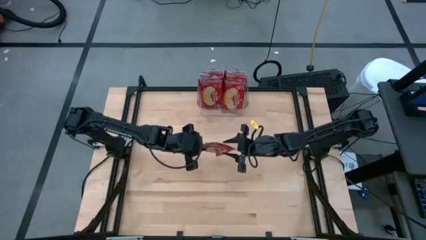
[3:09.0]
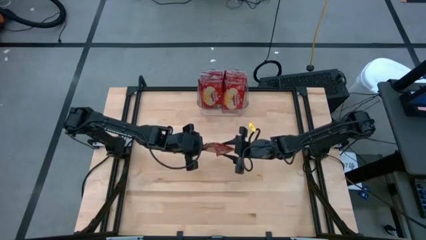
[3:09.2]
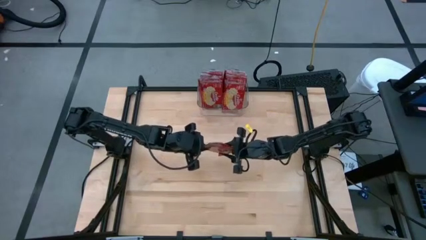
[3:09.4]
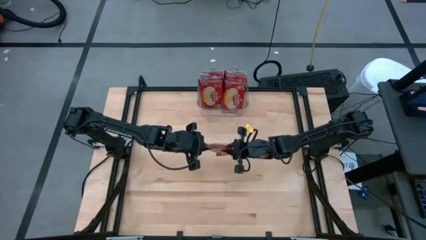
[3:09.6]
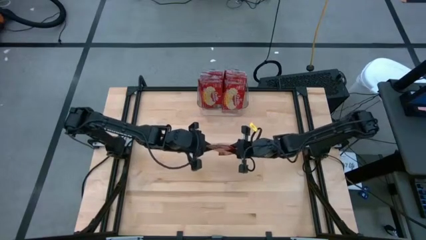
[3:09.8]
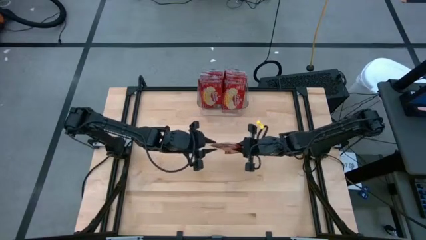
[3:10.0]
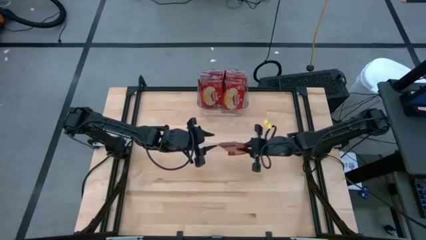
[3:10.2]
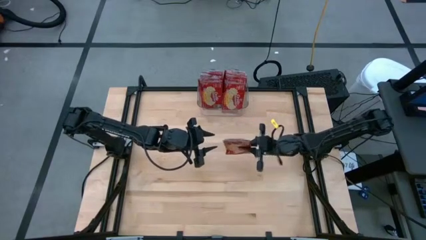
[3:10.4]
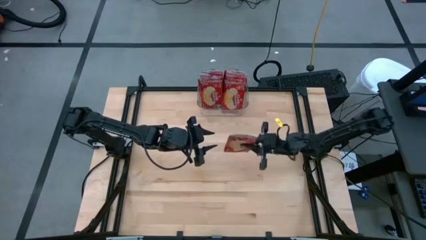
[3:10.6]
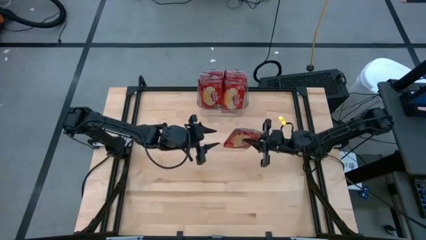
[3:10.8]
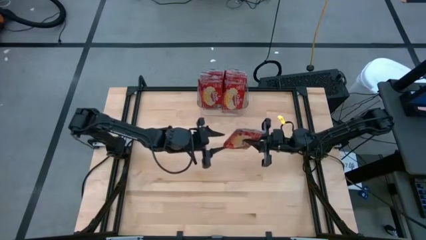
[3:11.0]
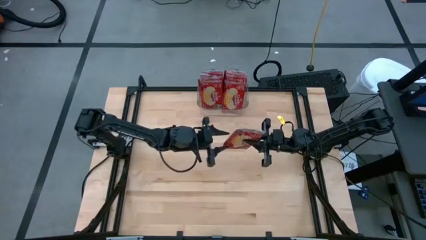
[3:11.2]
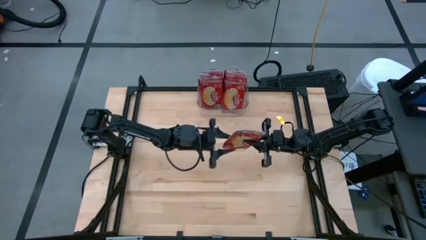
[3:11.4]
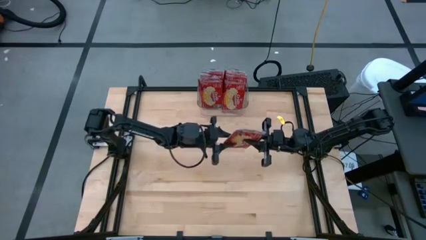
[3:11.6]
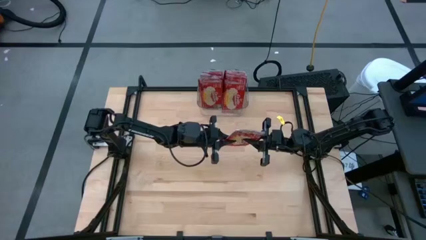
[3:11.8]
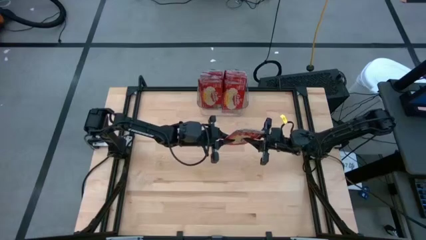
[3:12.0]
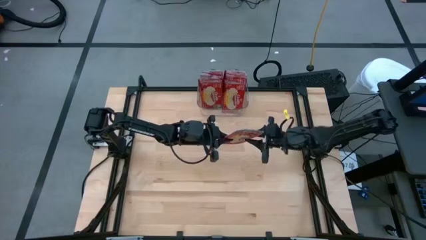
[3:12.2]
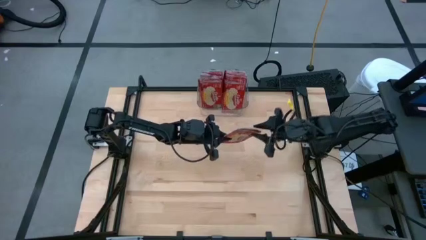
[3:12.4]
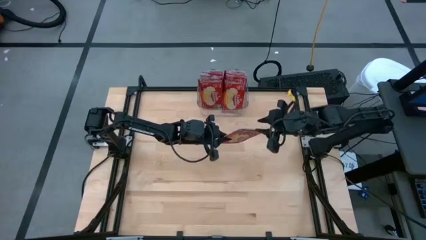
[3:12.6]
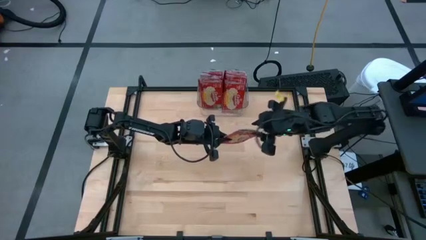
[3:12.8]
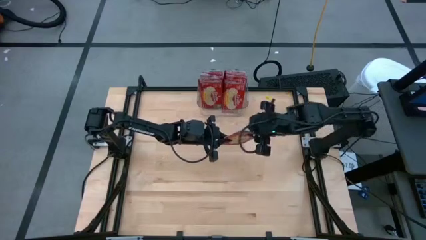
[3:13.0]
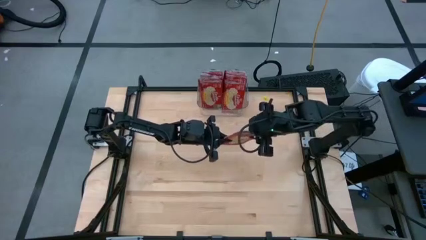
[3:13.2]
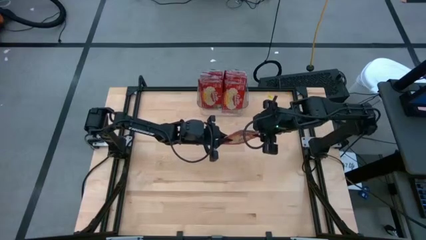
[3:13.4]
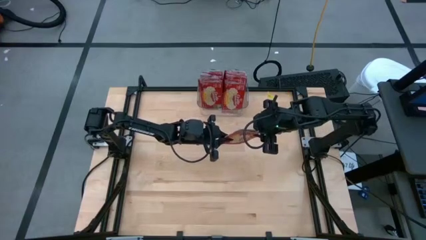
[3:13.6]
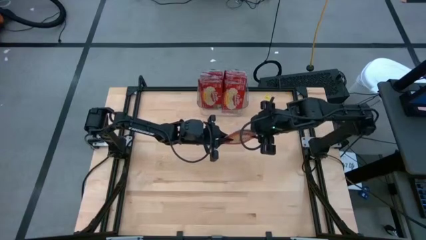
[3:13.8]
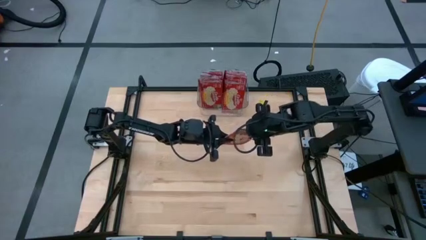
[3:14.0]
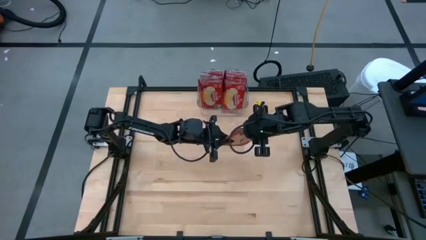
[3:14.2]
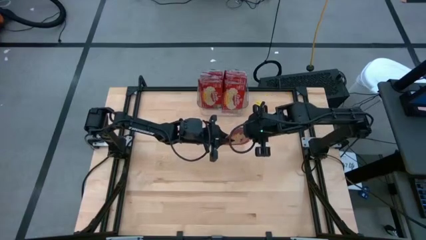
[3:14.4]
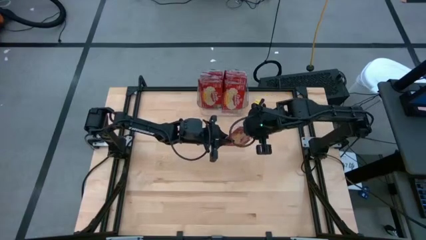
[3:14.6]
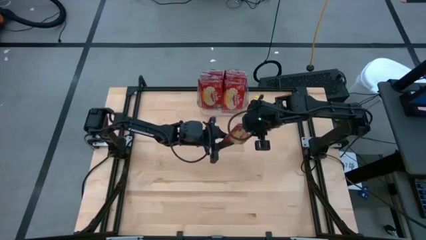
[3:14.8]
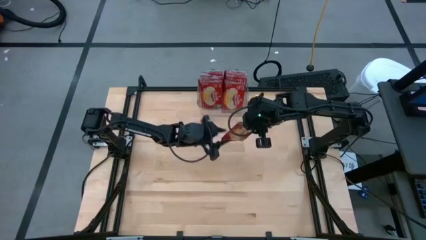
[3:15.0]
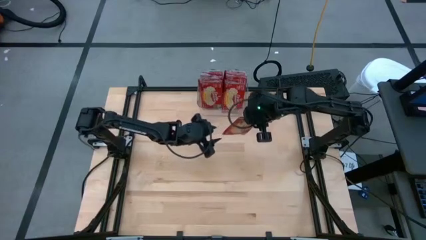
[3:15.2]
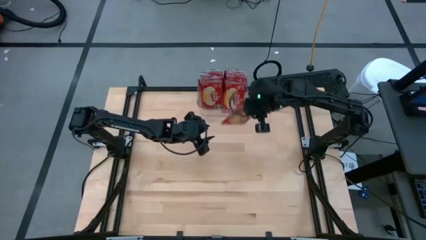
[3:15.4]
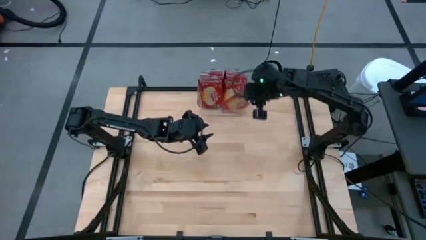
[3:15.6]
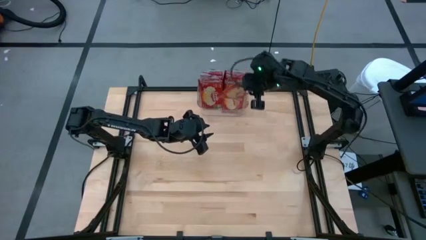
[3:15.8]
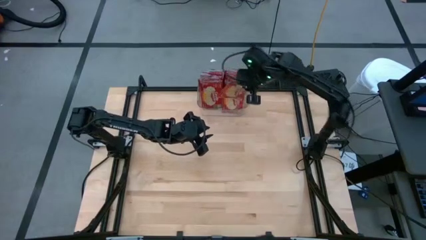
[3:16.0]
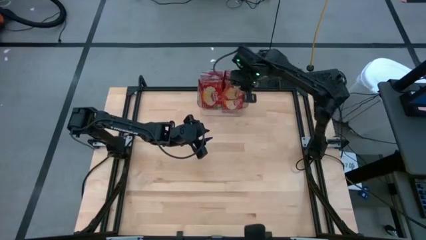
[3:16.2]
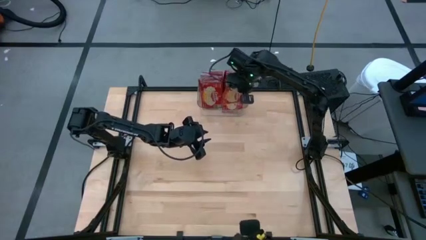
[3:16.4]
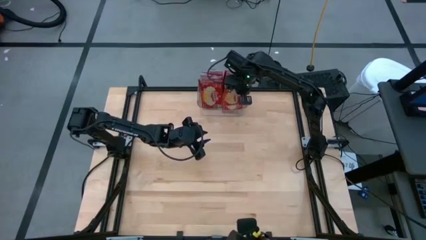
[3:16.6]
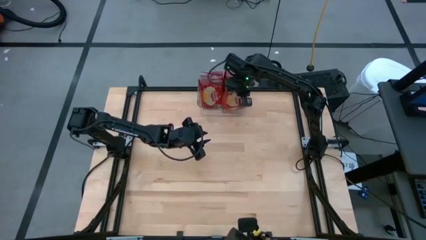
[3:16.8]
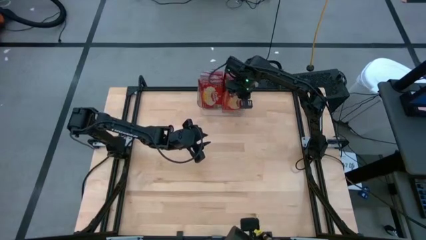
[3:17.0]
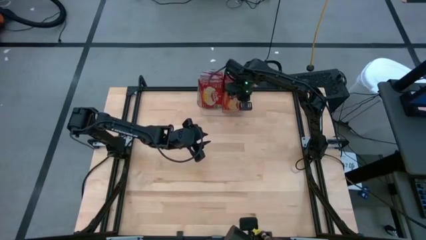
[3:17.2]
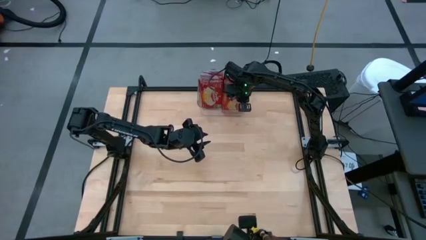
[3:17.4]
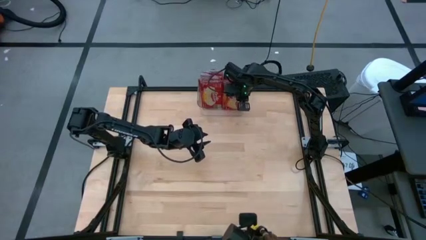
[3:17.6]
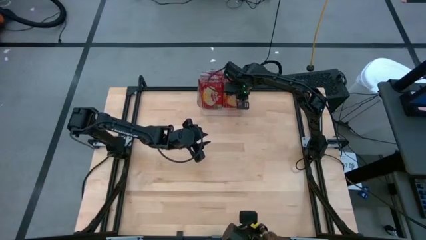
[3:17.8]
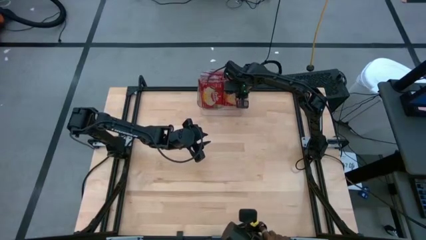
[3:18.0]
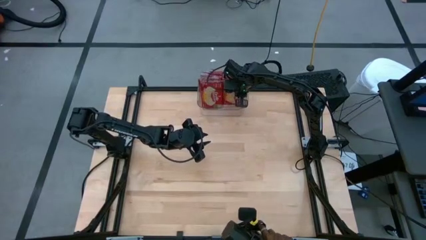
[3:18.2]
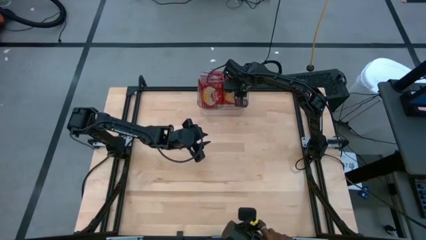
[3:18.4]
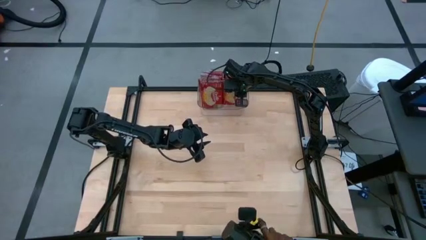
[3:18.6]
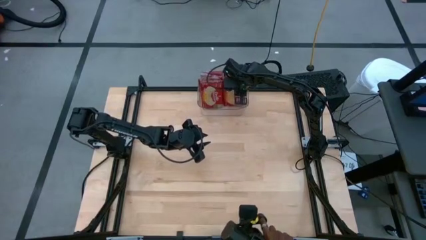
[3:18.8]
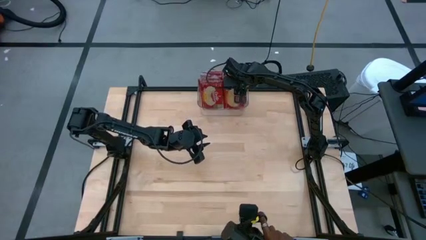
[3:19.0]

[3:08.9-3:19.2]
Task: Sort popcorn bags into baskets
Put the red popcorn bag into the transparent bin

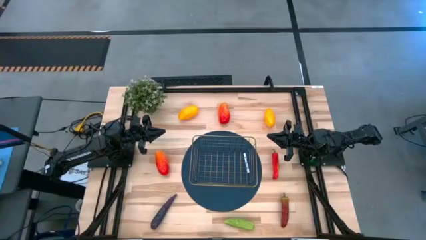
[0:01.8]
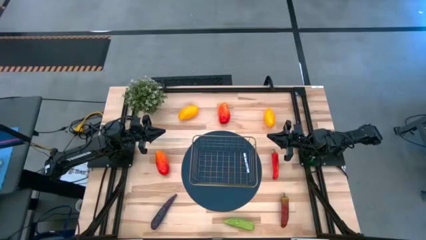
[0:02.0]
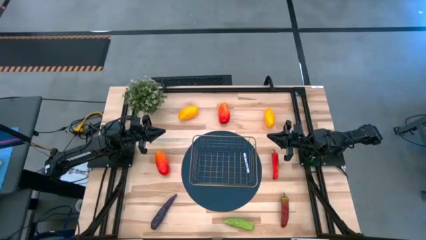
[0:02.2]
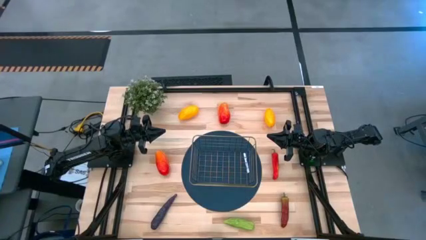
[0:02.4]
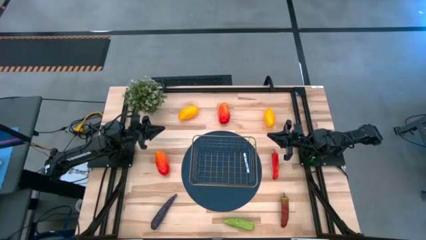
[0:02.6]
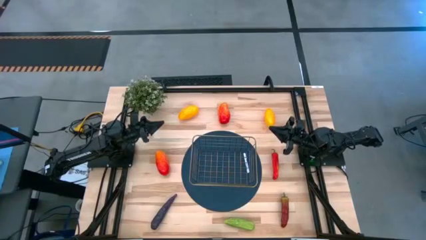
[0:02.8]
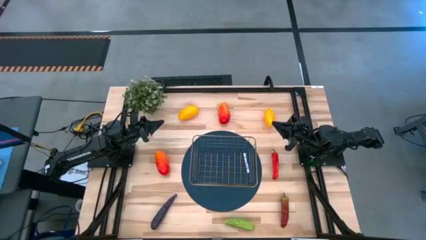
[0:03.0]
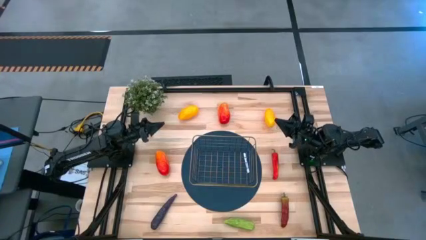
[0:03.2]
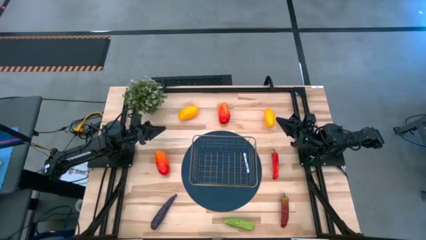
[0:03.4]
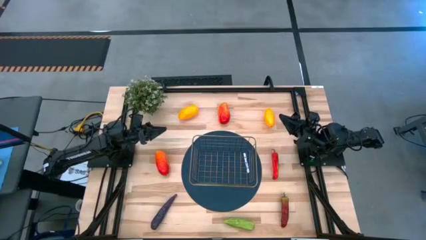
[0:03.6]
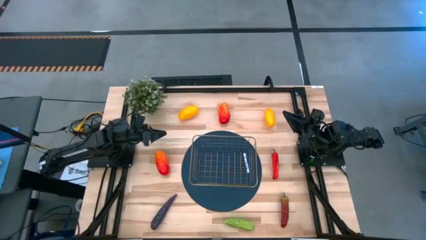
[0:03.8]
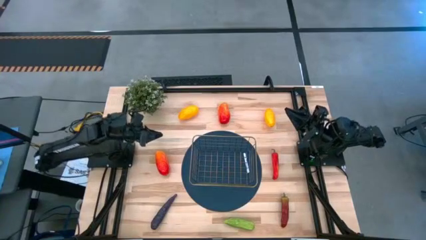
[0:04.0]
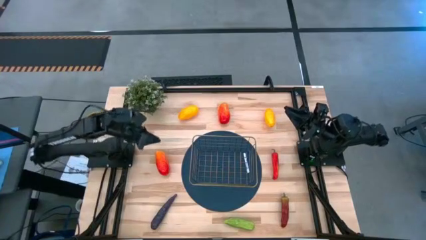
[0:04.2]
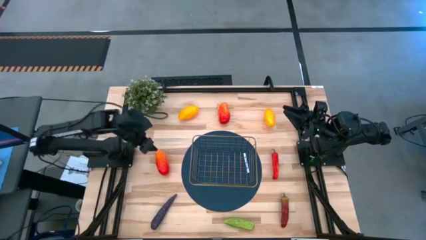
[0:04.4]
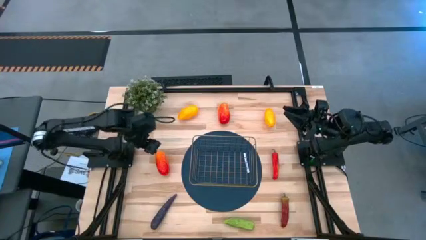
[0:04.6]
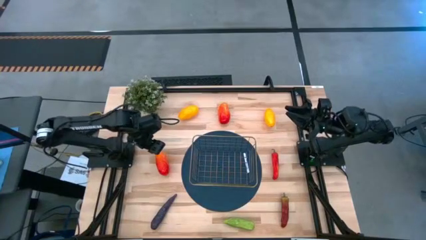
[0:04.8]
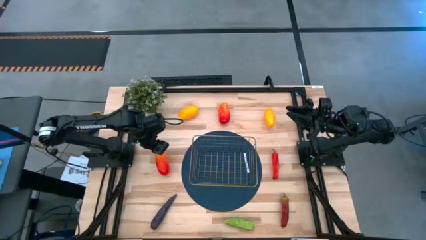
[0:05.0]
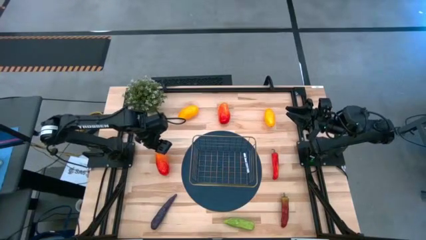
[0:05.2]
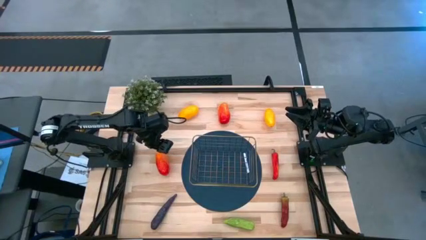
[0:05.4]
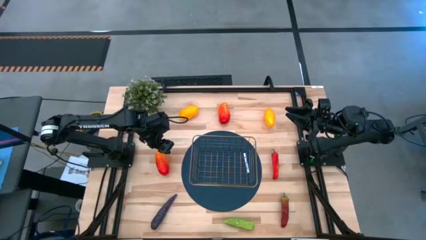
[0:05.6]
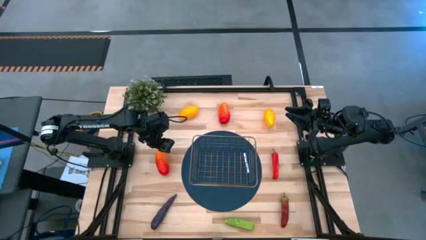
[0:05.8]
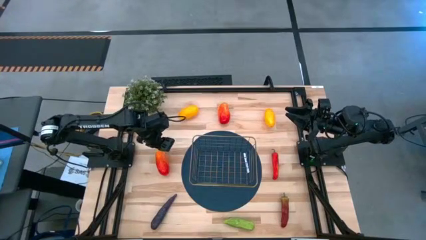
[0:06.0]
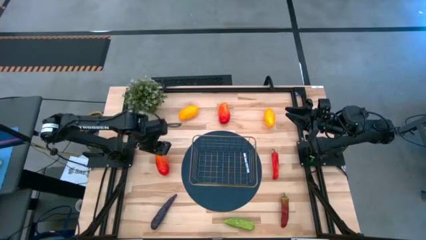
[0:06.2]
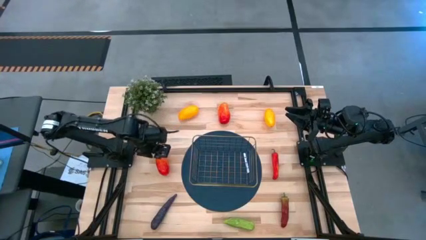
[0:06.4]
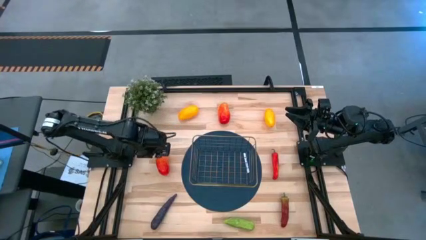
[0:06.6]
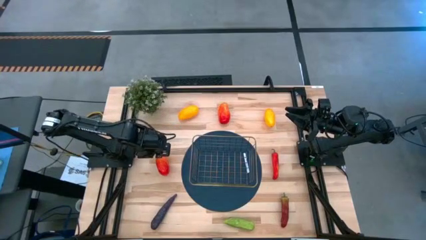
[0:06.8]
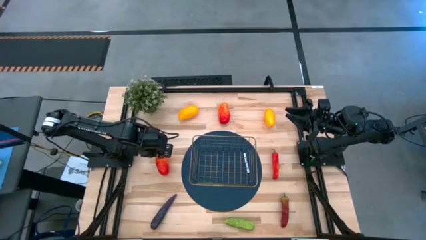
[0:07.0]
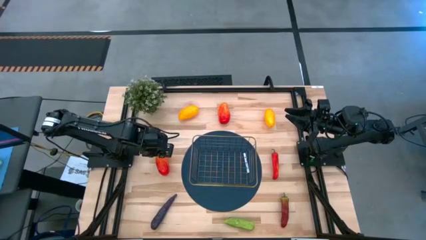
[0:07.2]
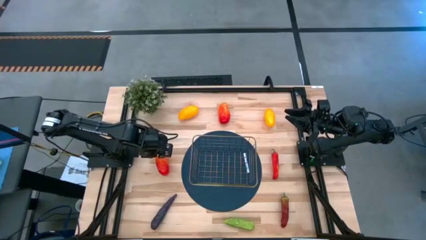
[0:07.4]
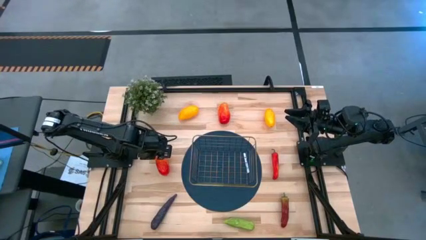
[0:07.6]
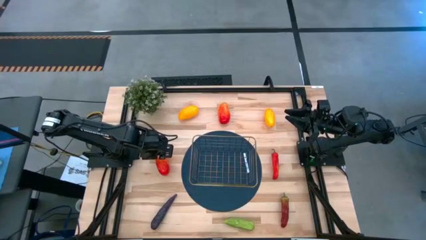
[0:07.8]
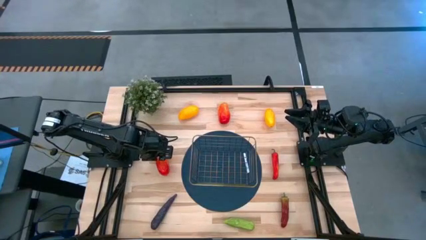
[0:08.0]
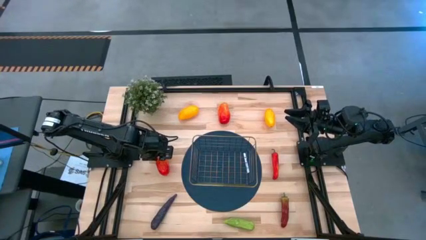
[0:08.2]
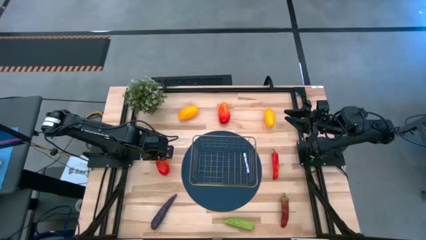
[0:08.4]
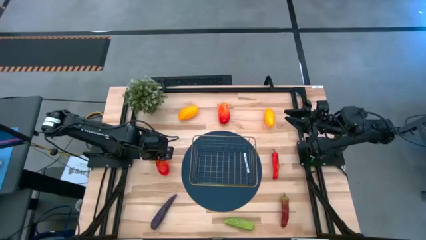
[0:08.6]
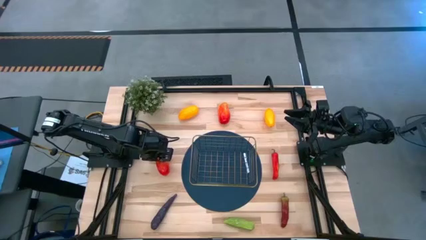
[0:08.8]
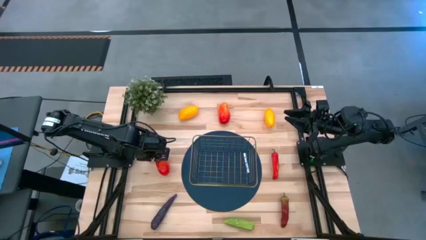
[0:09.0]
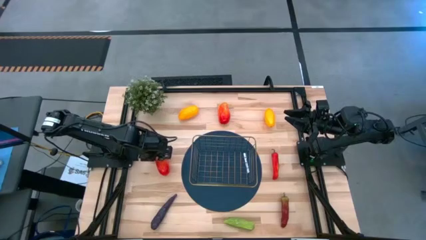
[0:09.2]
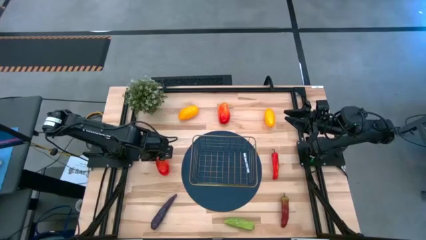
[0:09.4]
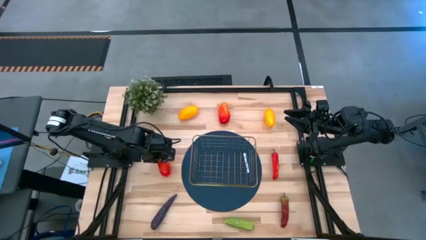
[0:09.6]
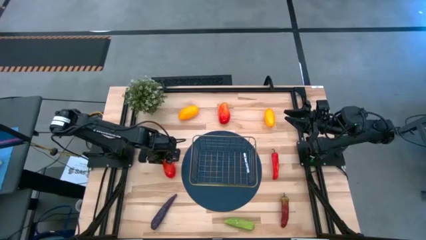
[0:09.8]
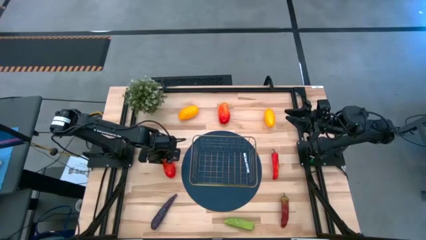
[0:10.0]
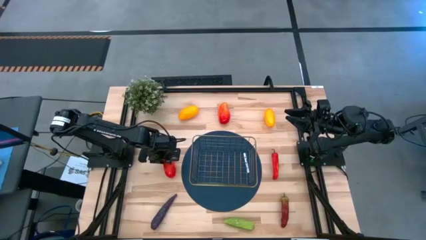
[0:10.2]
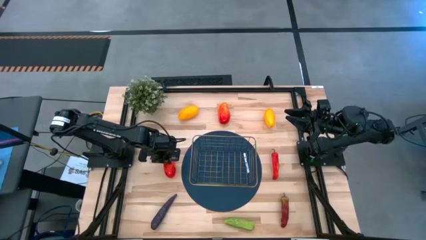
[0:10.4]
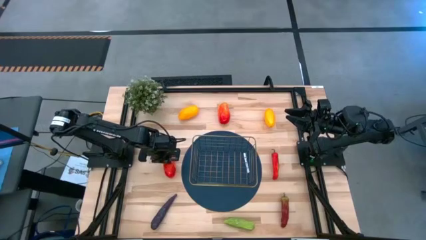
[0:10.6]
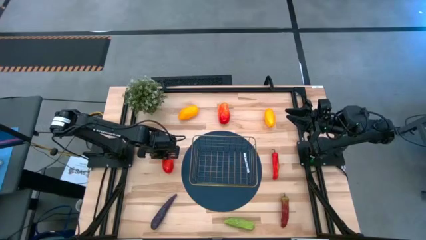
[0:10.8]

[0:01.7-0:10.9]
Task: Build produce basket
Put the bottom red mango into the gold wire basket
